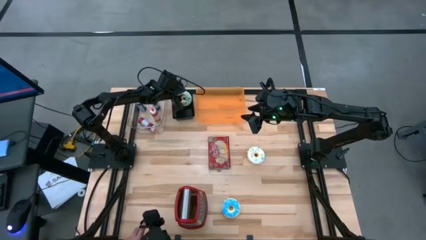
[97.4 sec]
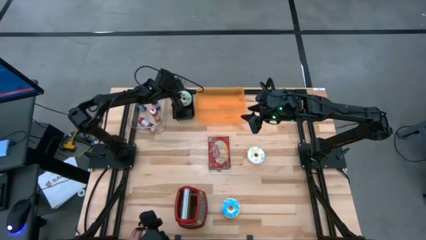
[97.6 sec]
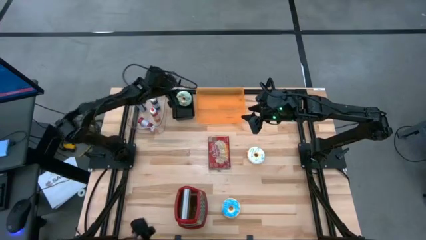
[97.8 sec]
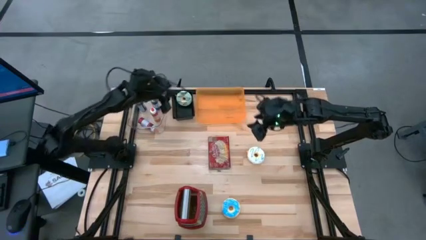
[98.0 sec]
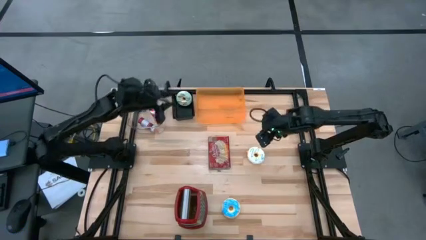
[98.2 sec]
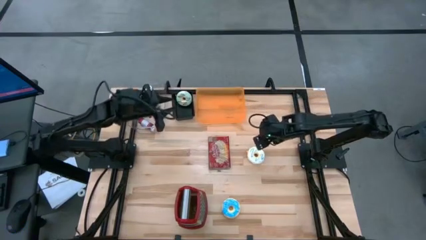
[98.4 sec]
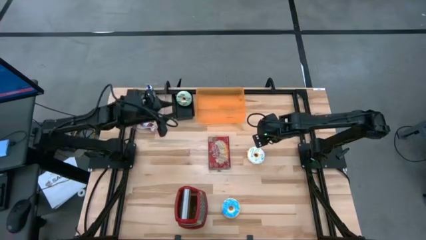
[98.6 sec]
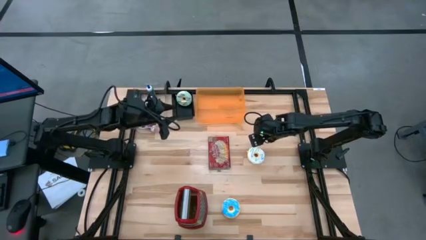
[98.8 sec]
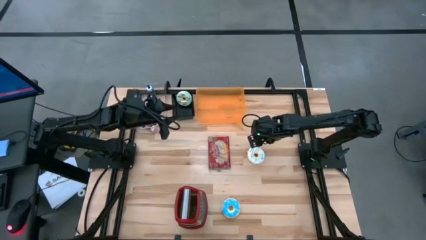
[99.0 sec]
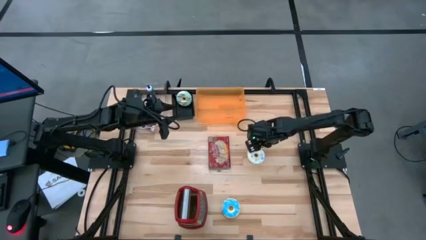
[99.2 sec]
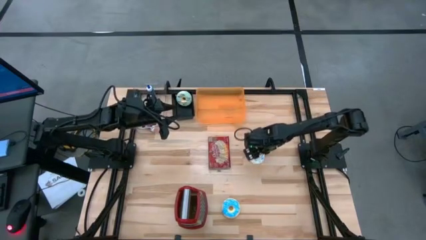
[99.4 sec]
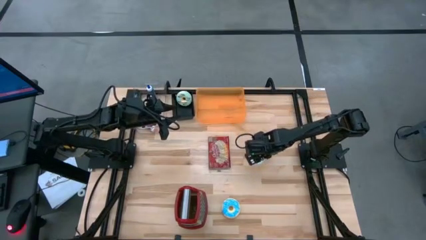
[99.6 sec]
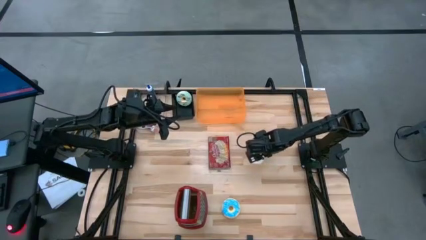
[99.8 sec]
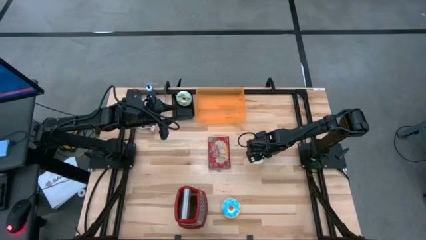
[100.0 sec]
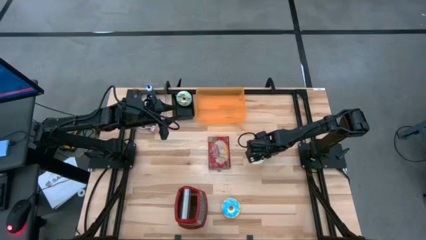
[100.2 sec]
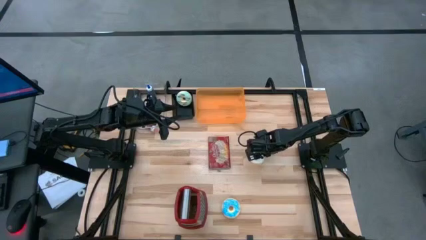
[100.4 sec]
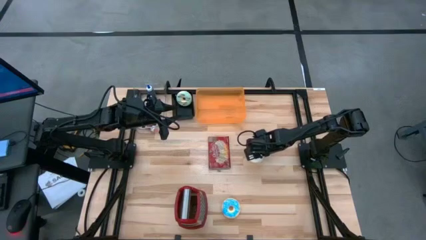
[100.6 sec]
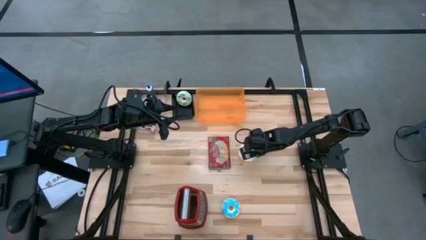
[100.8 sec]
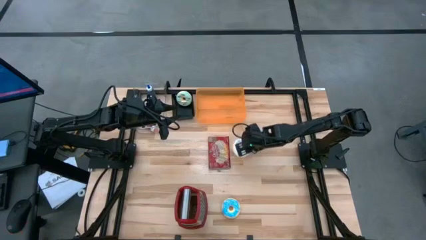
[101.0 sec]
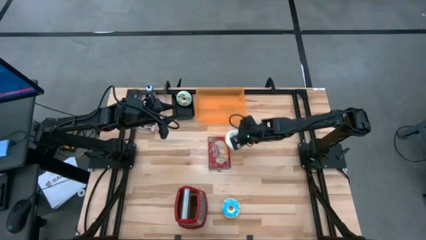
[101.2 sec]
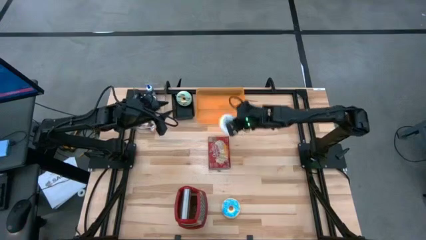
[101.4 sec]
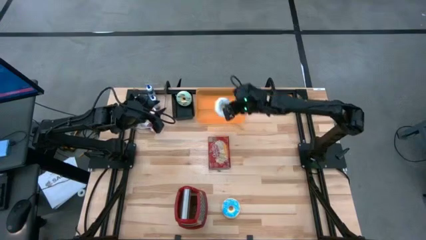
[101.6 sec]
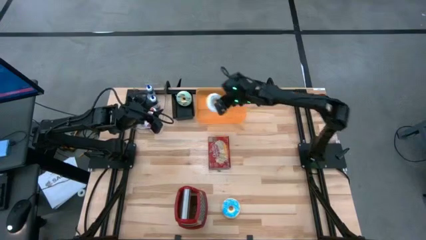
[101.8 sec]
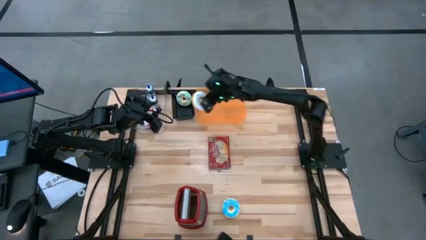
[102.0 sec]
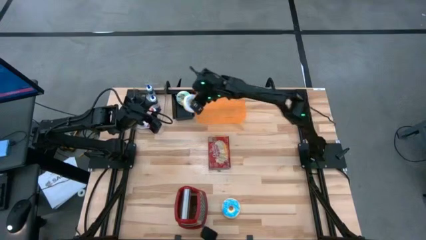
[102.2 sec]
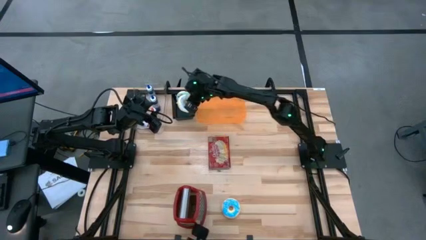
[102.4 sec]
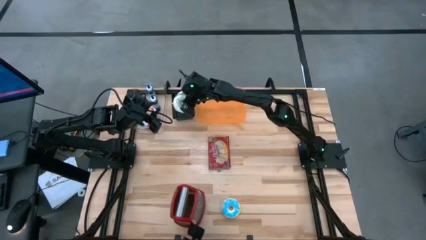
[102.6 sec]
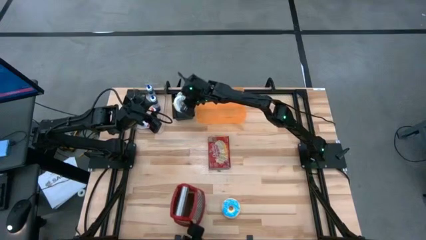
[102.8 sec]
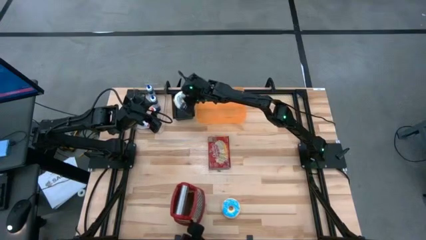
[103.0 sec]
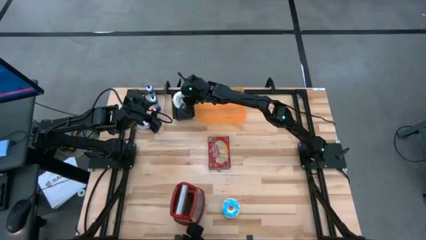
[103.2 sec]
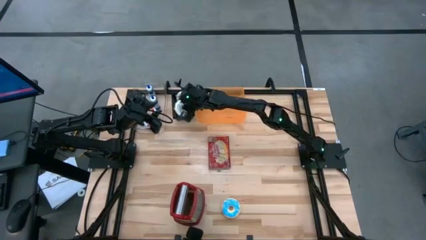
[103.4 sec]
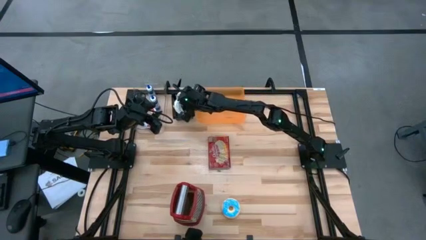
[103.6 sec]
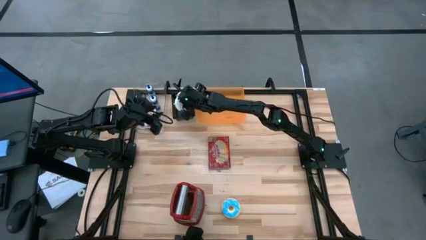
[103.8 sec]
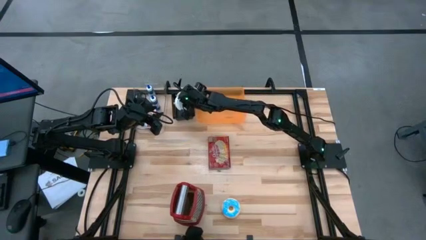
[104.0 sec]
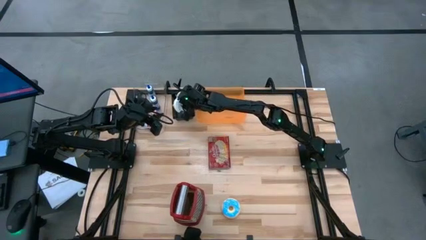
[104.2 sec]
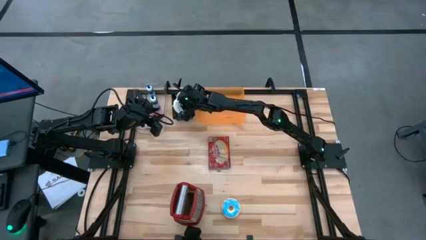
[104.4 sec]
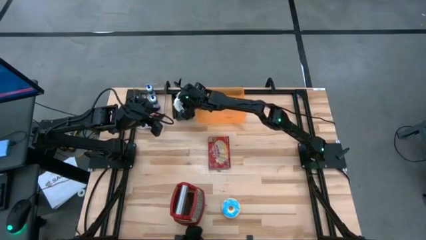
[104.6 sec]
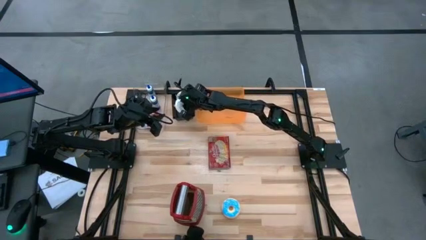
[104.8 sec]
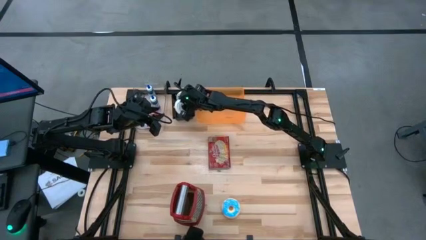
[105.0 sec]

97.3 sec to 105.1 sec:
Put the white donut into the black bin

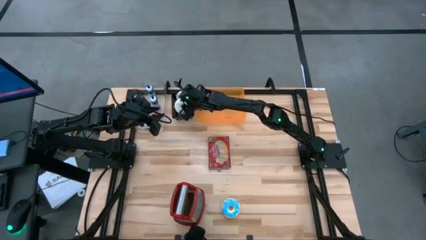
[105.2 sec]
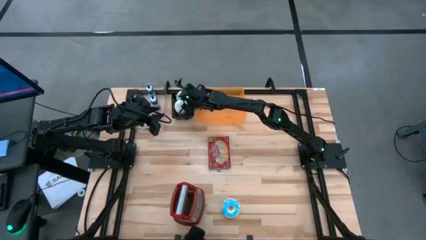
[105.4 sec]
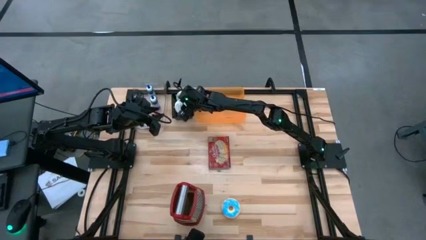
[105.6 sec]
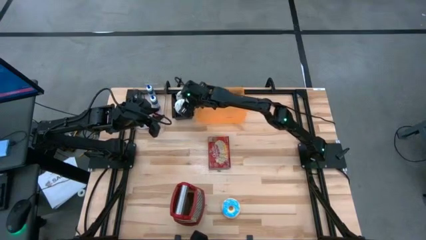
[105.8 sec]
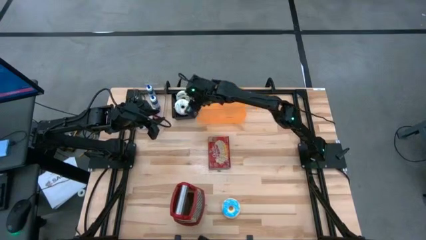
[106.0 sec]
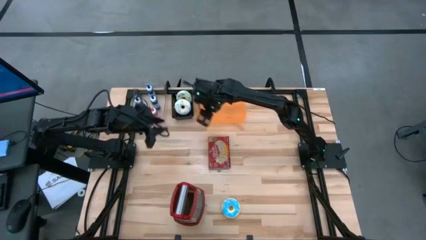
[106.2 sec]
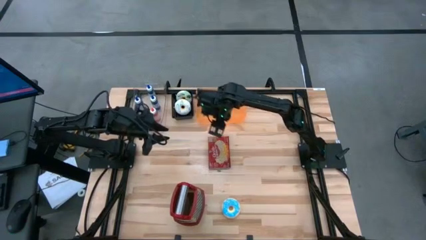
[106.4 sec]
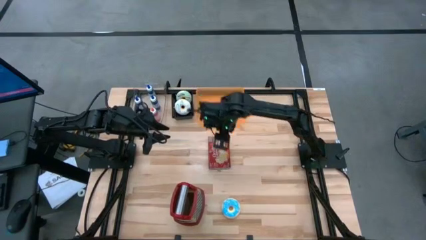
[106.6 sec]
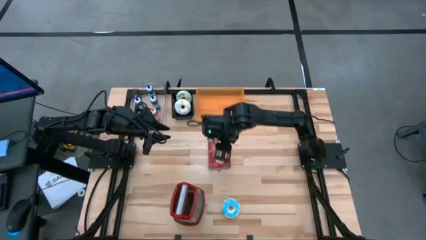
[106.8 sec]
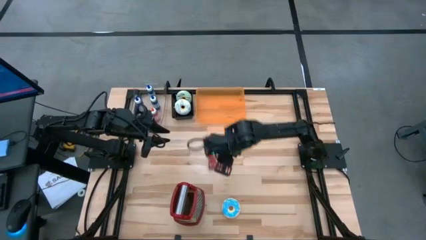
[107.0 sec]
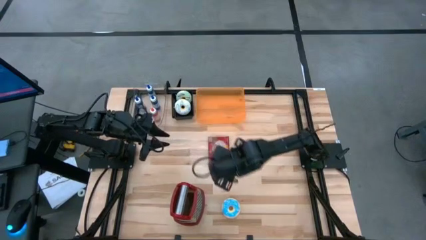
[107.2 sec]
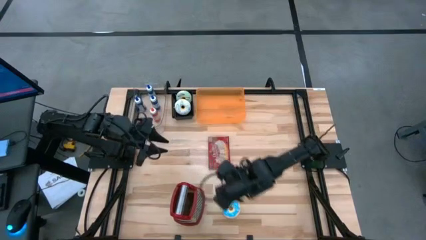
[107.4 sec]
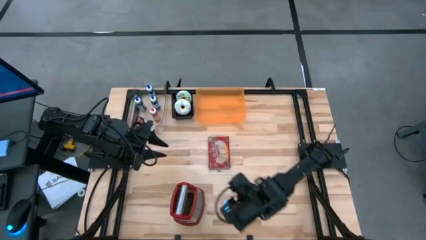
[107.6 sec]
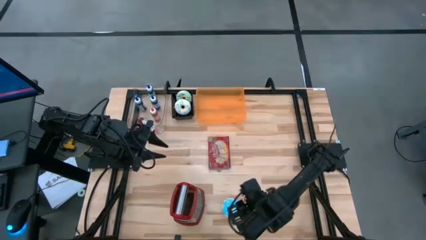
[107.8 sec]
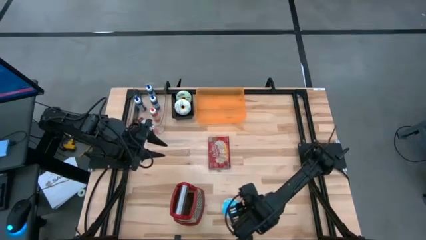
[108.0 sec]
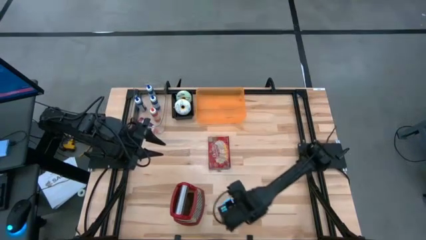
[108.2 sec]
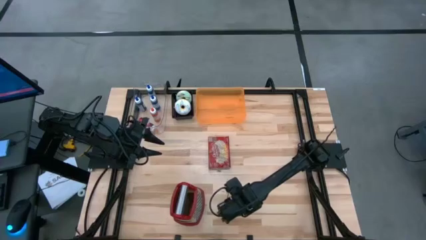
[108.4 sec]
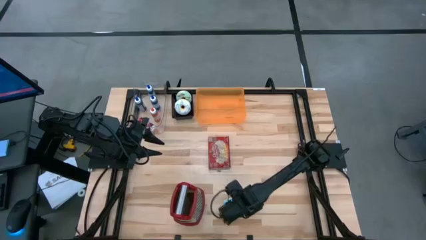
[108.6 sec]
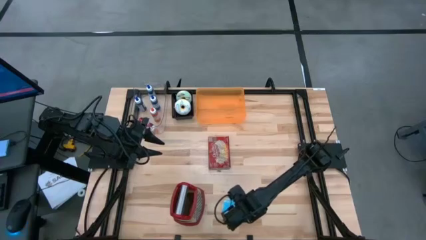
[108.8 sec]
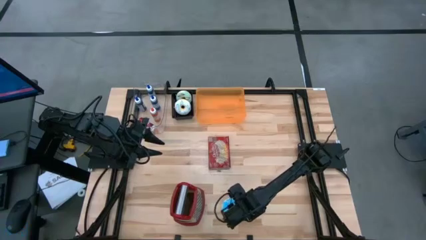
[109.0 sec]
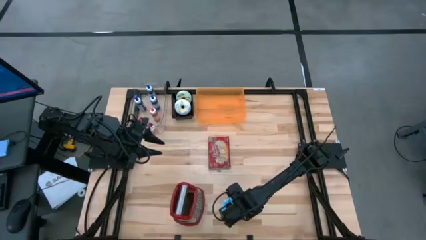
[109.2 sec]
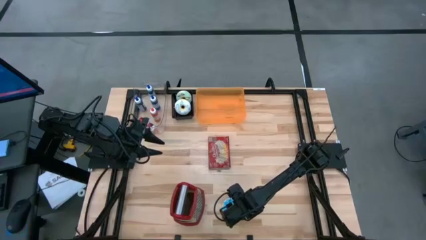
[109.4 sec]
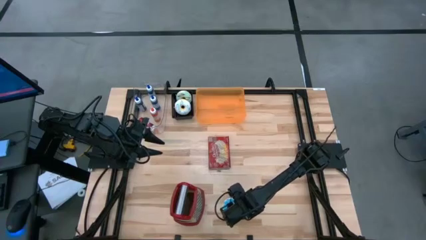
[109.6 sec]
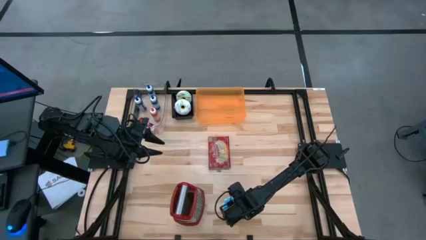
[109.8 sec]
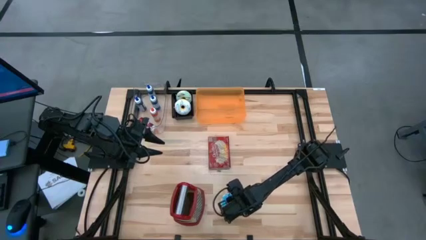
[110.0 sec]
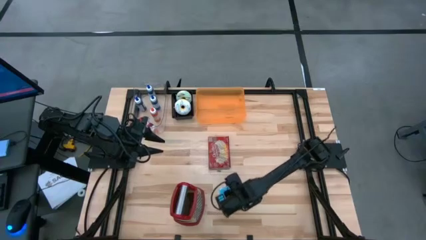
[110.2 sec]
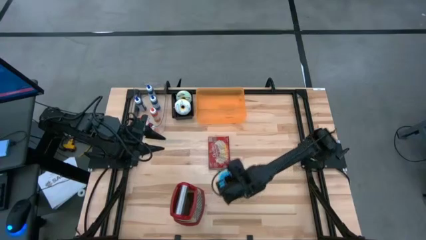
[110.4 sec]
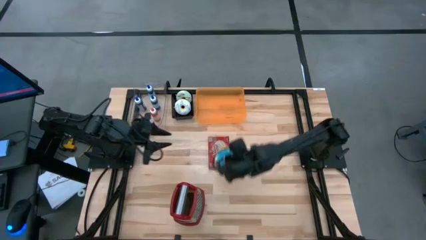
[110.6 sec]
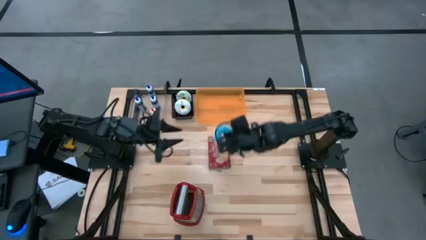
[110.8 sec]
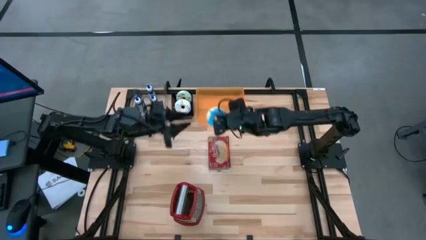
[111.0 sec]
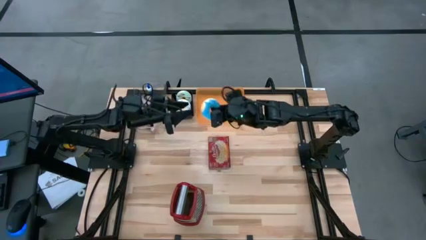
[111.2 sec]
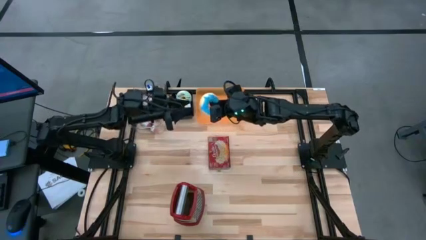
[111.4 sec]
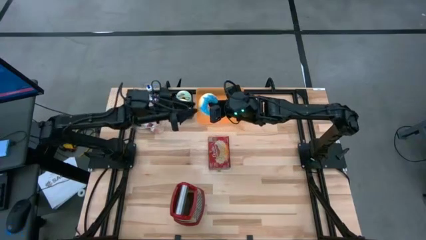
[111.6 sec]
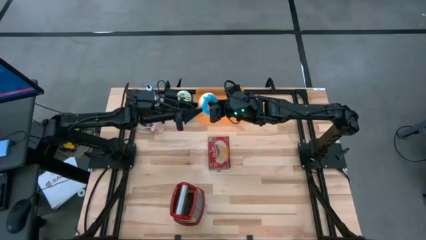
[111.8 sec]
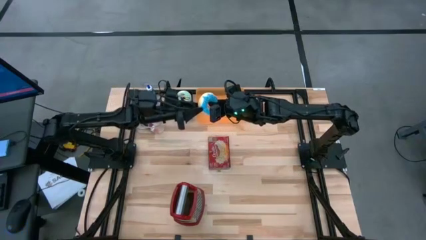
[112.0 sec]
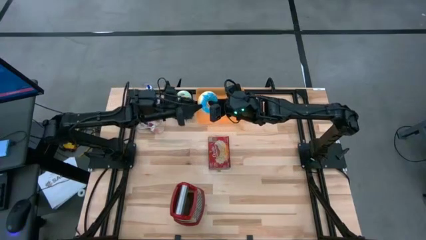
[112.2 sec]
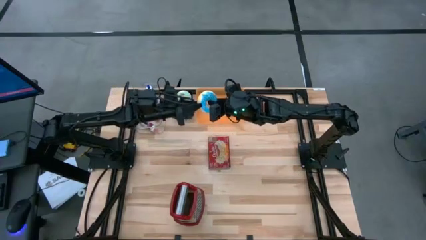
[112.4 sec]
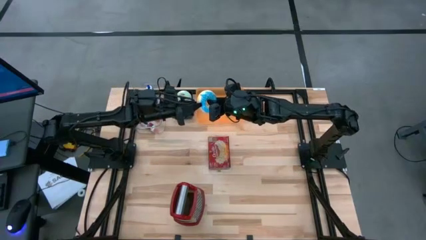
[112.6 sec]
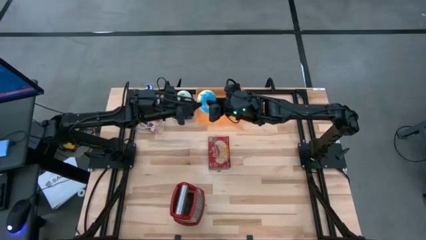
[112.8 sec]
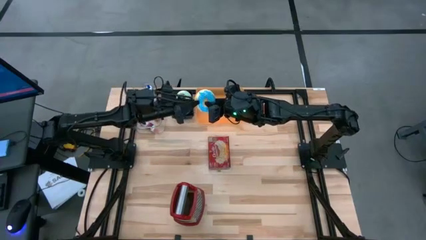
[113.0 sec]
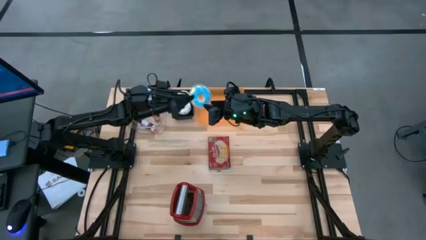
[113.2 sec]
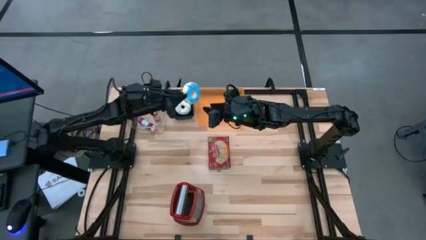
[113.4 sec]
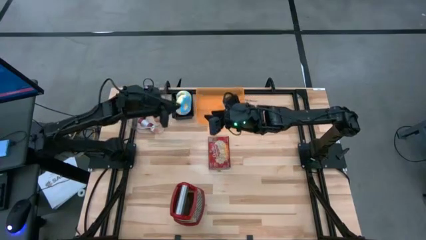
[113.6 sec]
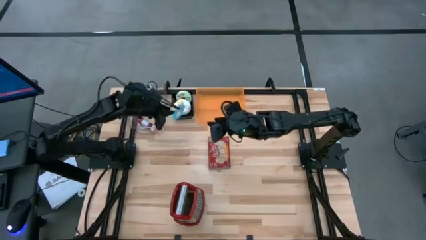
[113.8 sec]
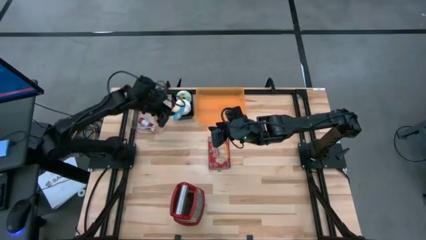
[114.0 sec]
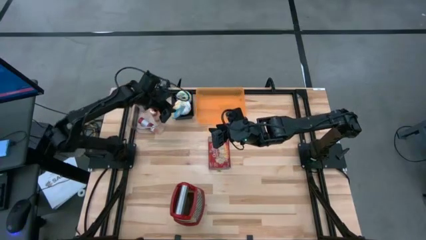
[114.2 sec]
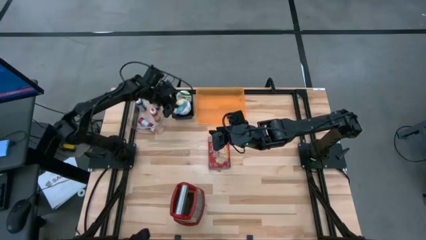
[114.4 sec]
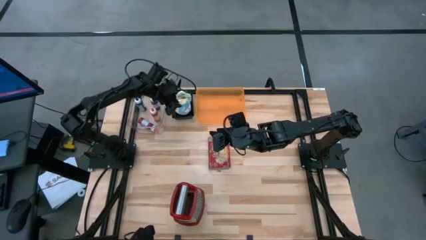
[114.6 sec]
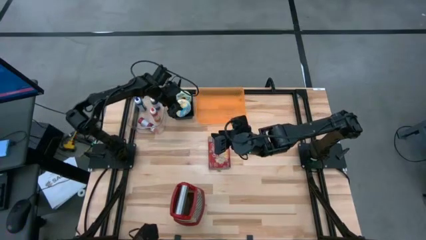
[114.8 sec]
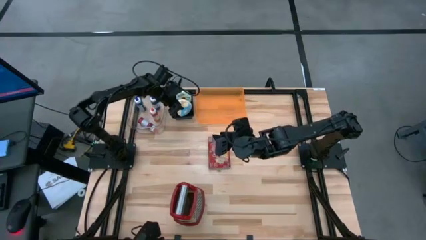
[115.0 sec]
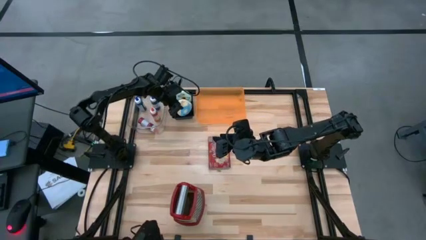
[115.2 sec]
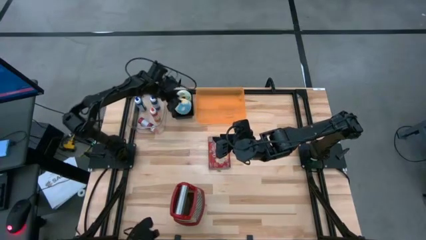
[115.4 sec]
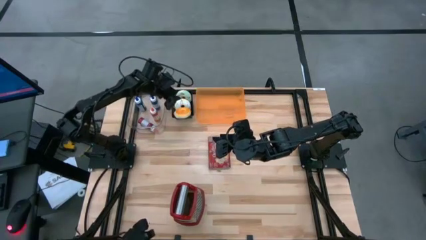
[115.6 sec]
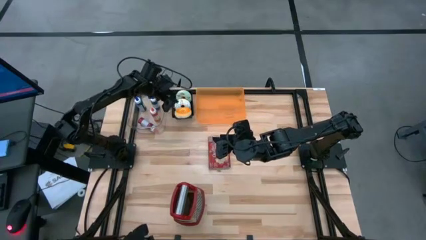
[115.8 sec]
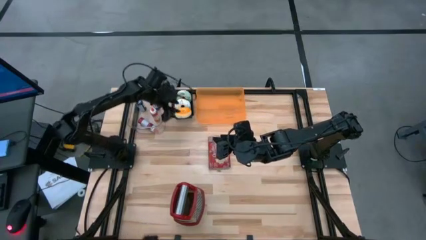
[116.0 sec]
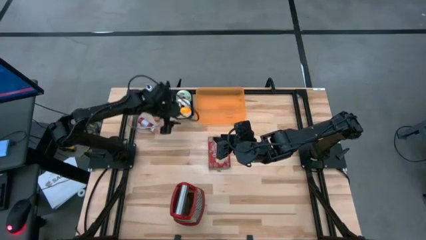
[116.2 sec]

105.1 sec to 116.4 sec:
Put the blue donut into the black bin
